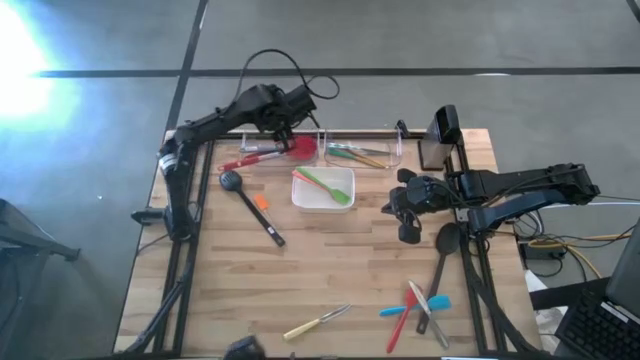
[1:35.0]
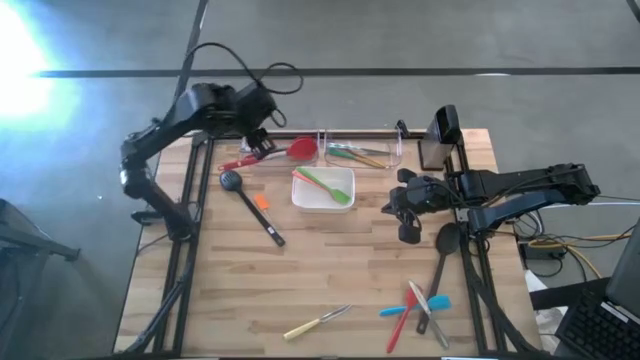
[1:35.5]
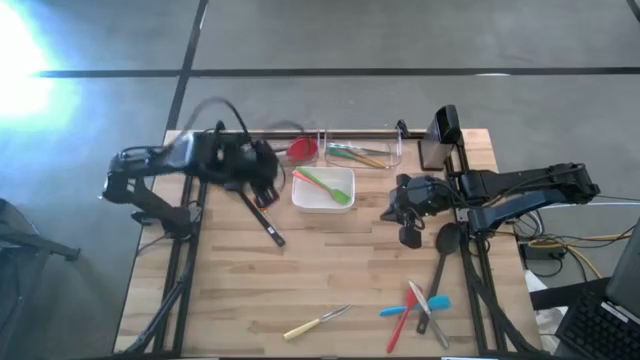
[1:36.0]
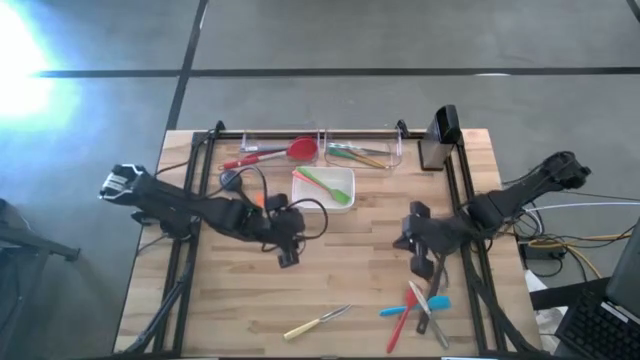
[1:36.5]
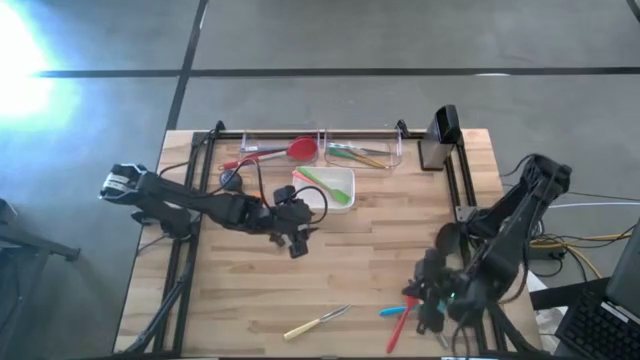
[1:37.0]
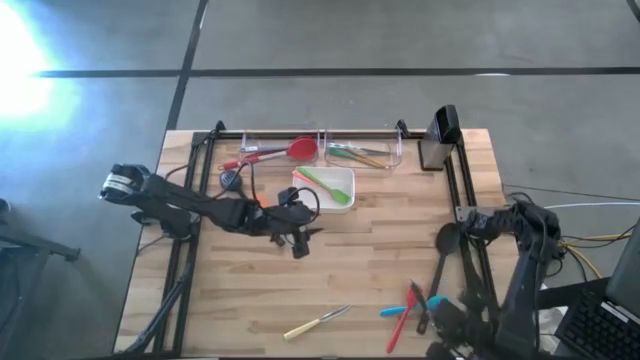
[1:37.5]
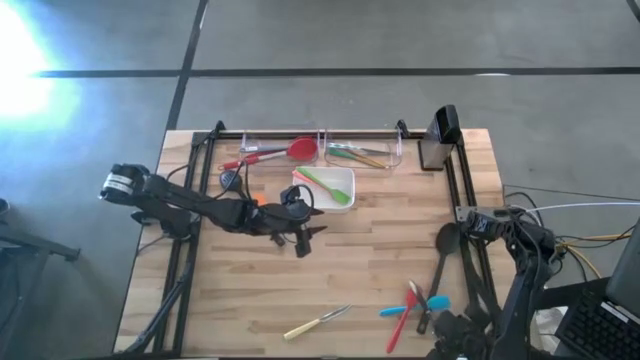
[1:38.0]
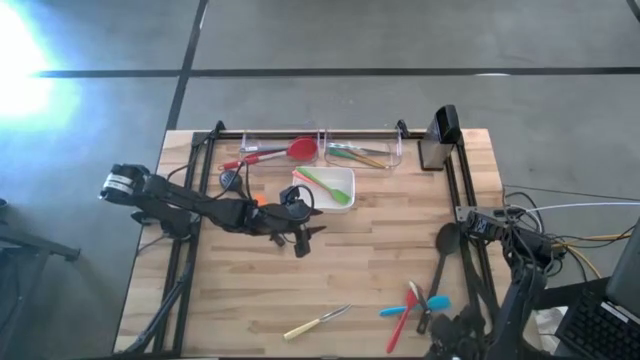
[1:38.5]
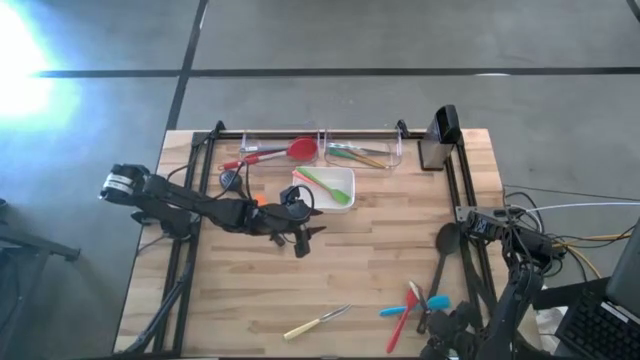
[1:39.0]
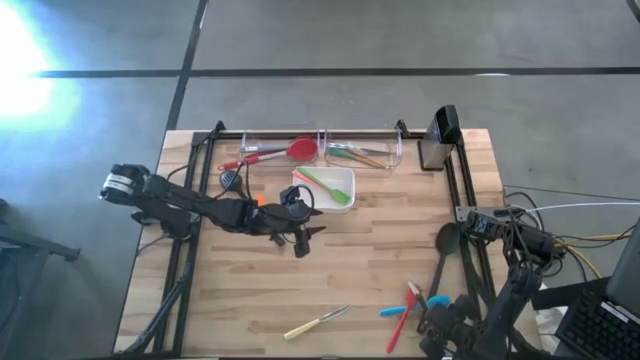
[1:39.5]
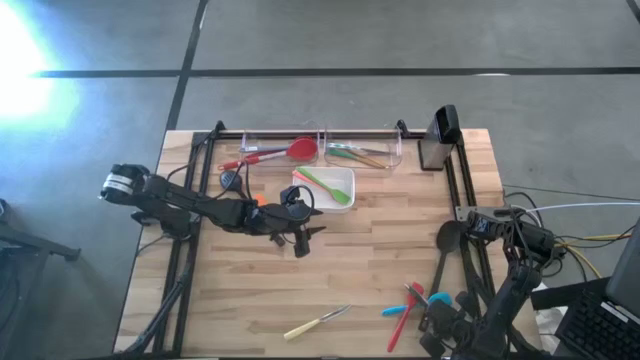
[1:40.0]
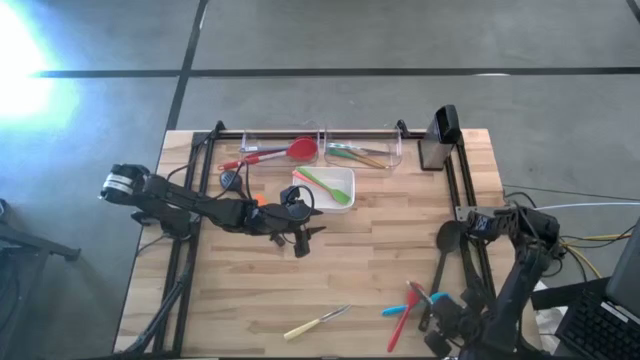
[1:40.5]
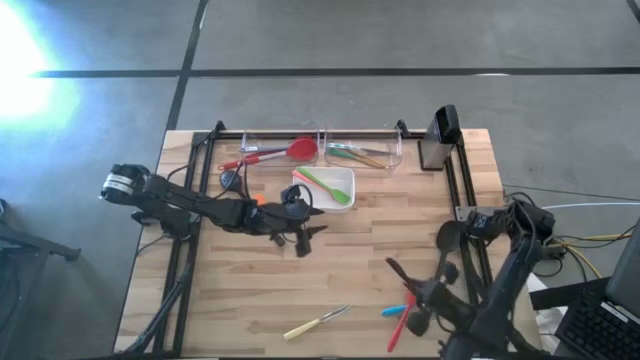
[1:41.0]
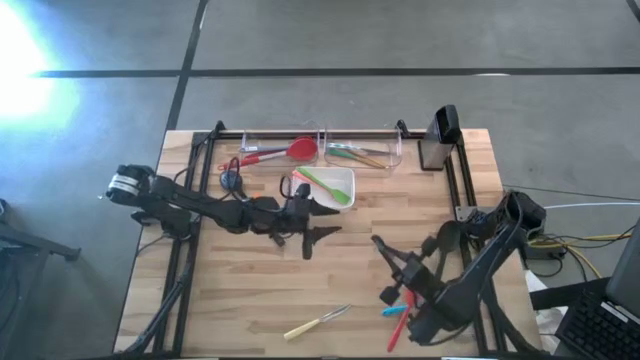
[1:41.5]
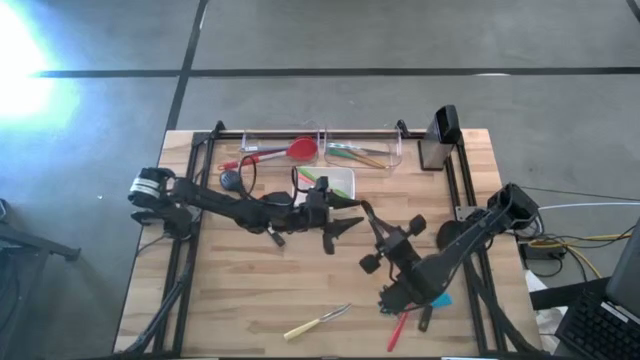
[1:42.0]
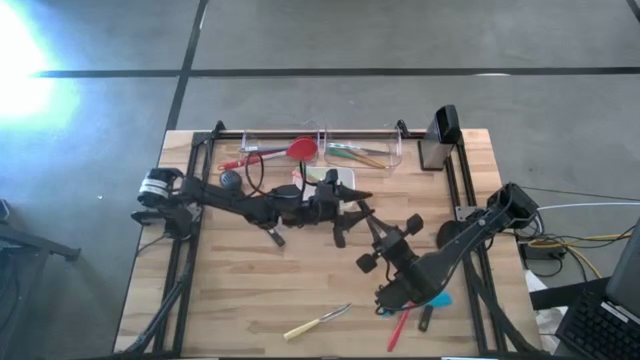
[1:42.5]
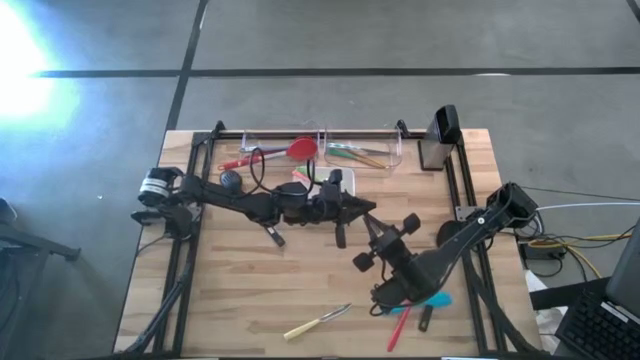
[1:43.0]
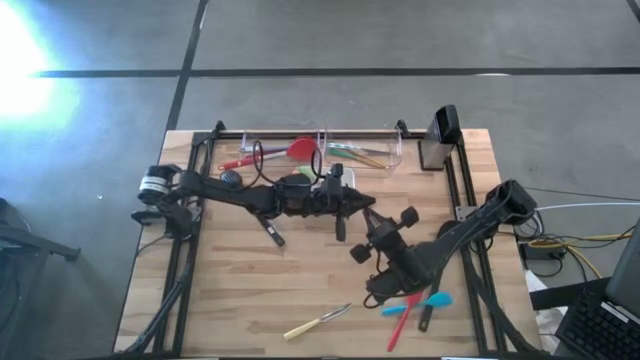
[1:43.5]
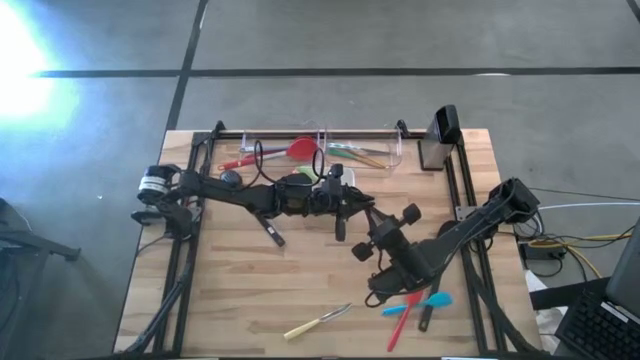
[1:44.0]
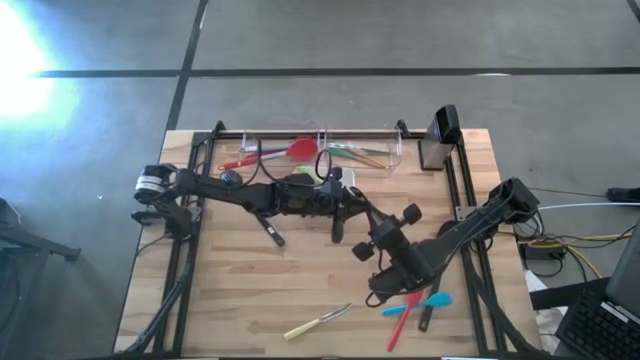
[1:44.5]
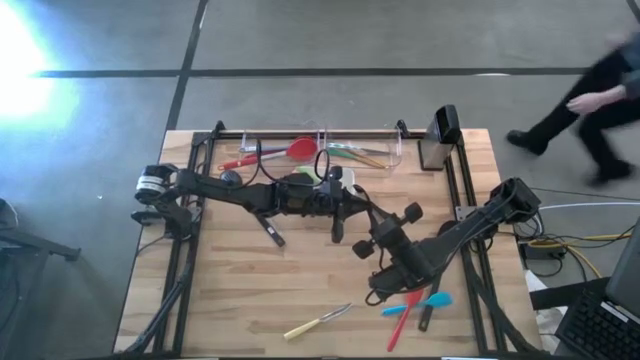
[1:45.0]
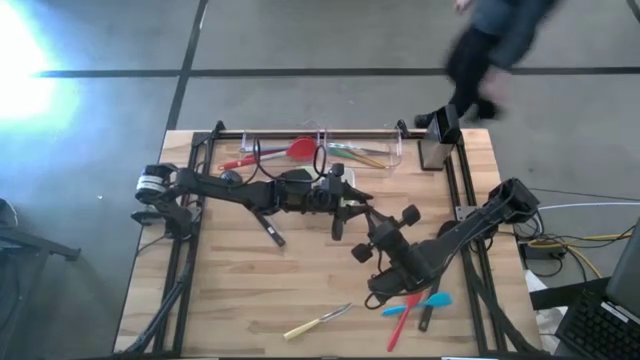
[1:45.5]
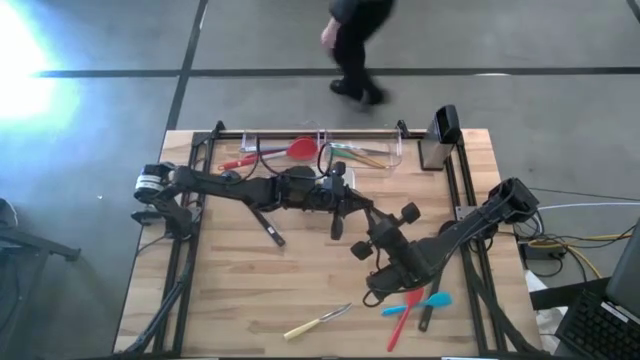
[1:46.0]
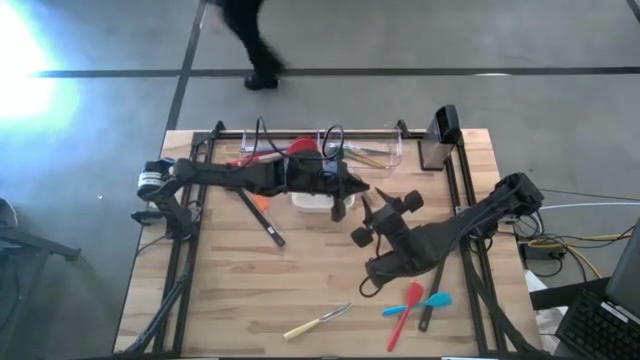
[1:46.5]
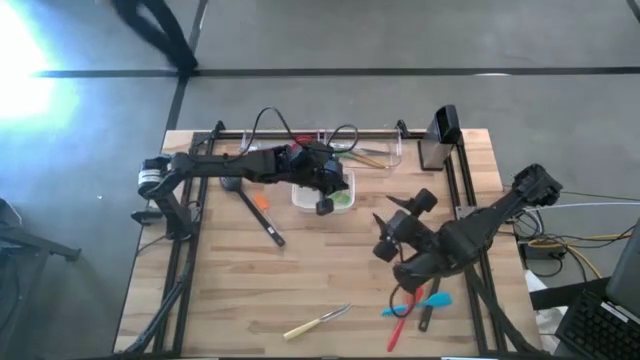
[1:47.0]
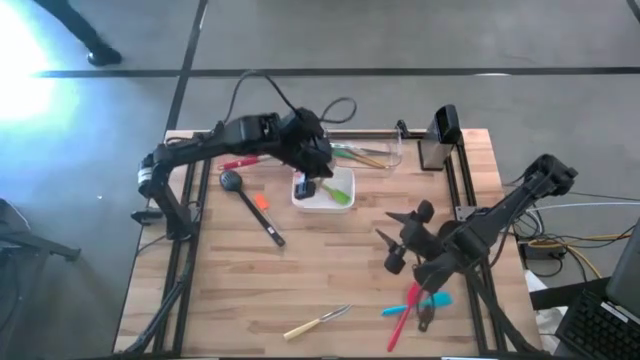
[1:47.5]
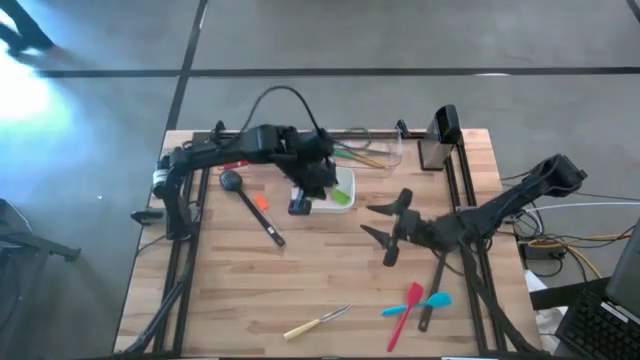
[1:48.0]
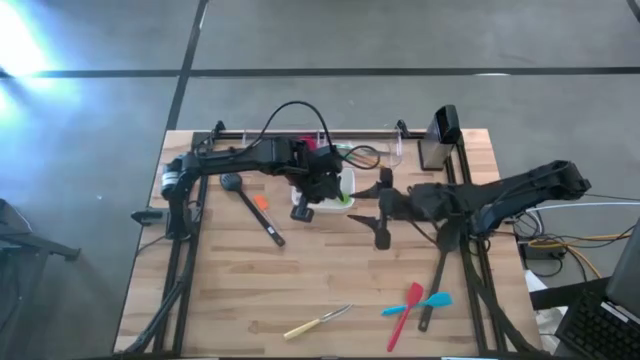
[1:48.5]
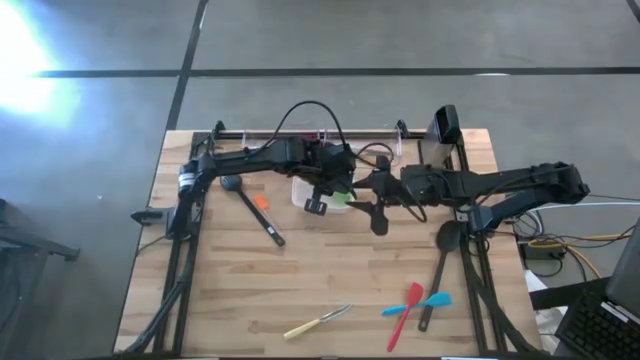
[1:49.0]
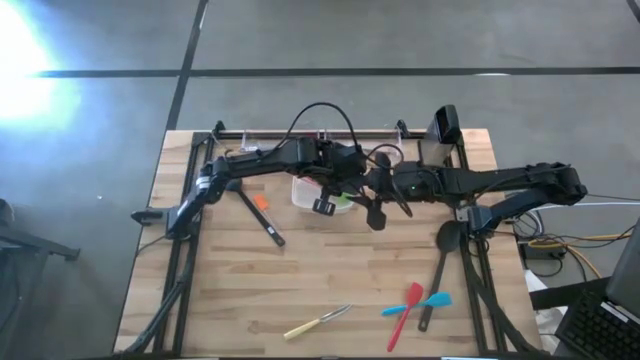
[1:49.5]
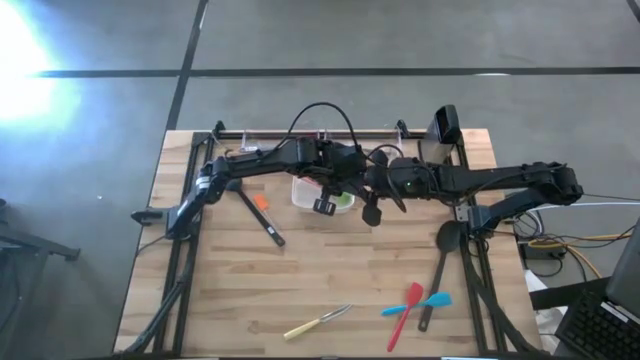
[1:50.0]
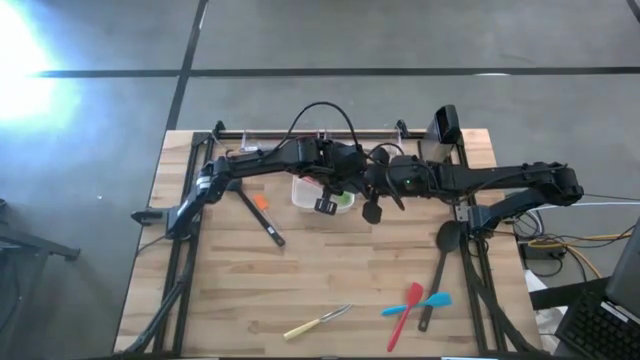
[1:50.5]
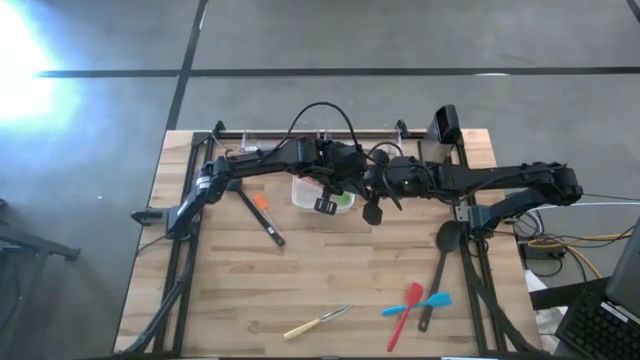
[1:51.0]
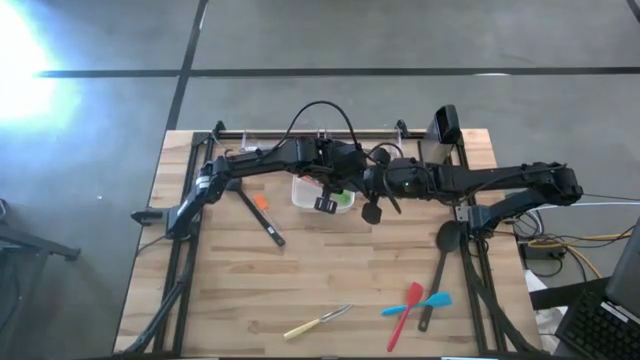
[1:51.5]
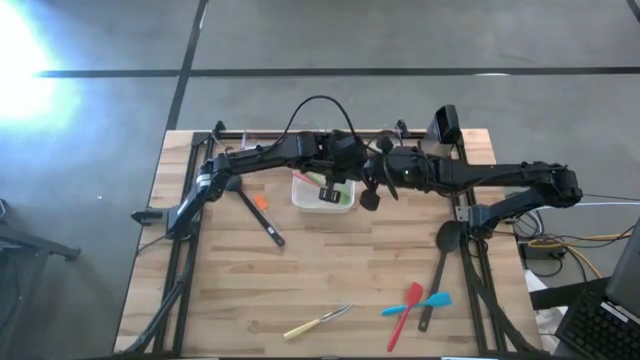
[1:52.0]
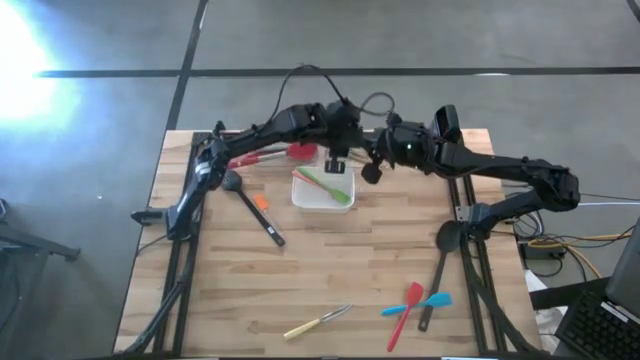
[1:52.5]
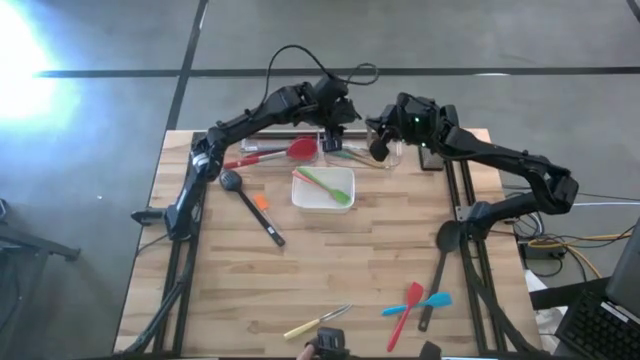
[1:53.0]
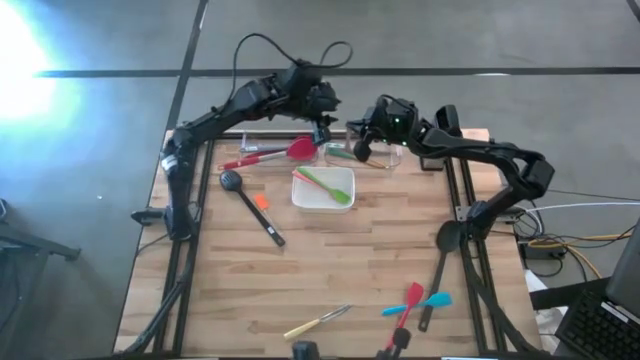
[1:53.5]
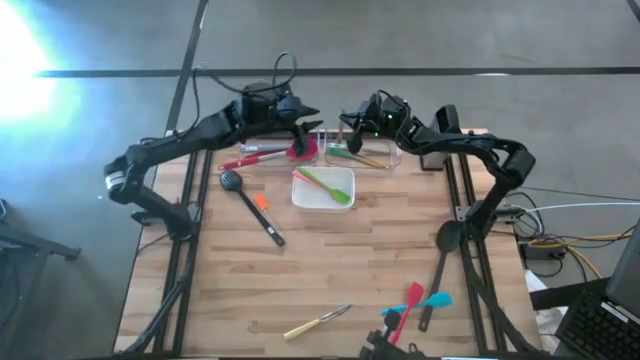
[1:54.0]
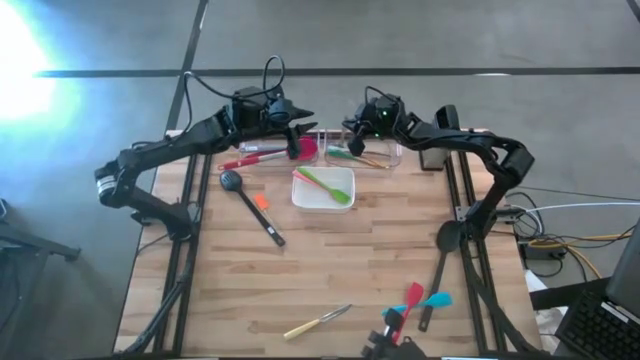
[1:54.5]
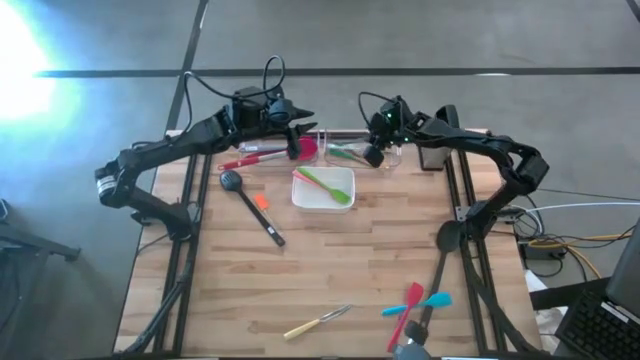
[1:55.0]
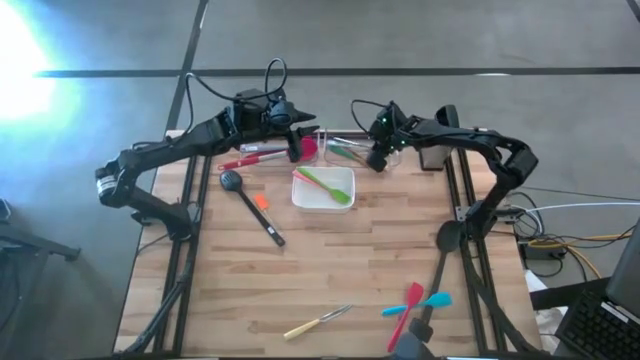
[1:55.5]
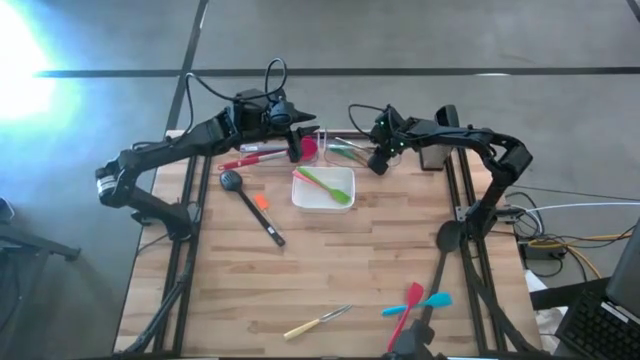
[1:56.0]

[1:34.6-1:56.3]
Task: Pick & Place Kitchen Items
Put the silver table knife into the right transparent bin

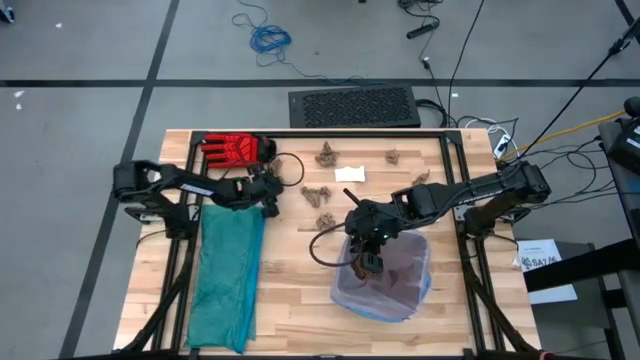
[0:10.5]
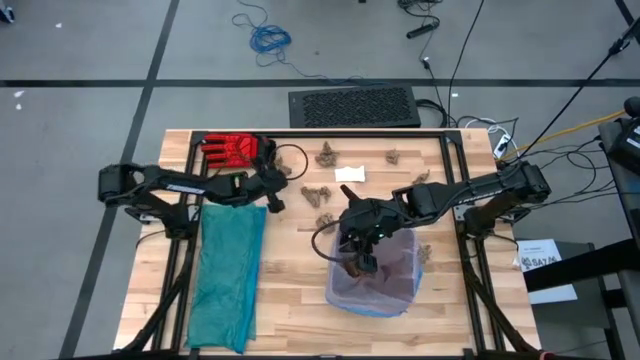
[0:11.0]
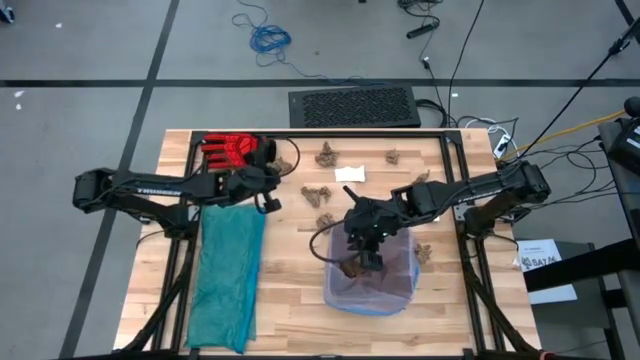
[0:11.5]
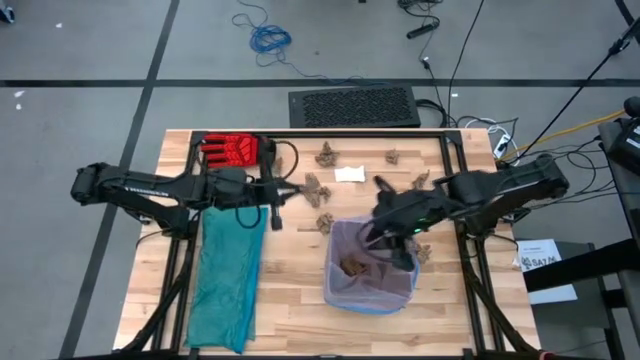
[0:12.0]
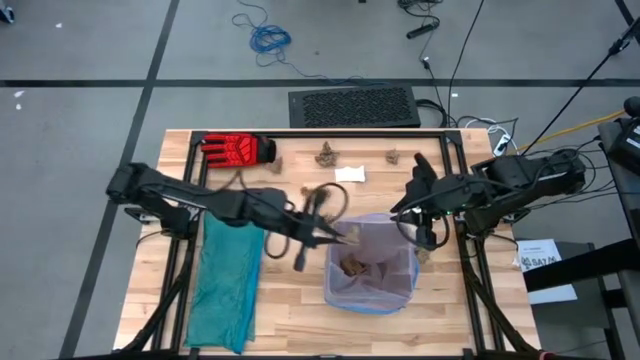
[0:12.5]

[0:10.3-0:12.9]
Task: place trash/remove bag and relplace
Put the brown napkin into the black trash bin
